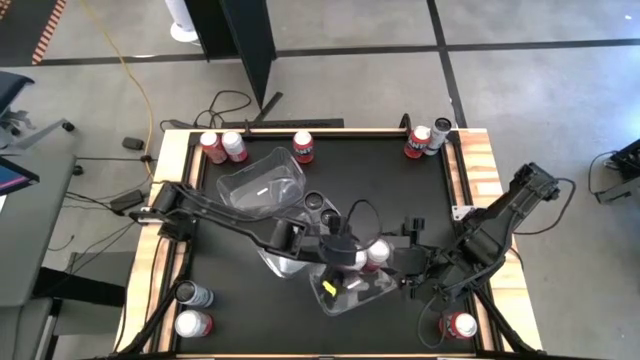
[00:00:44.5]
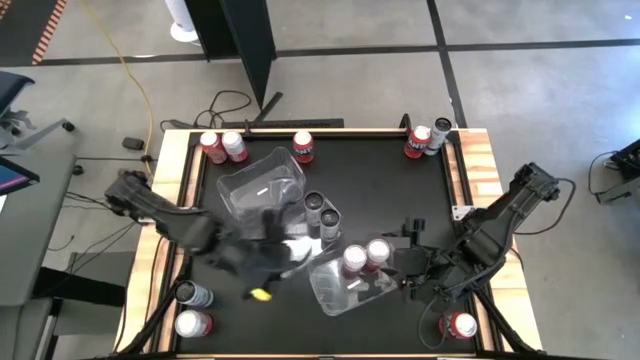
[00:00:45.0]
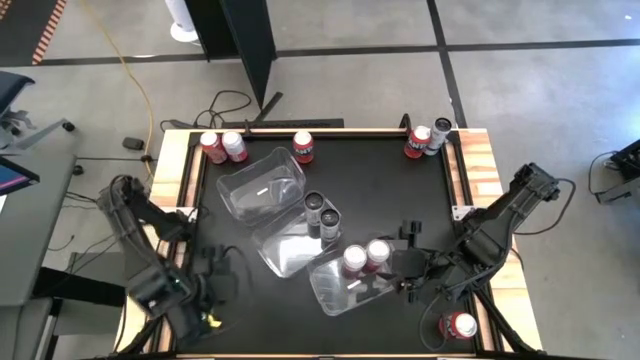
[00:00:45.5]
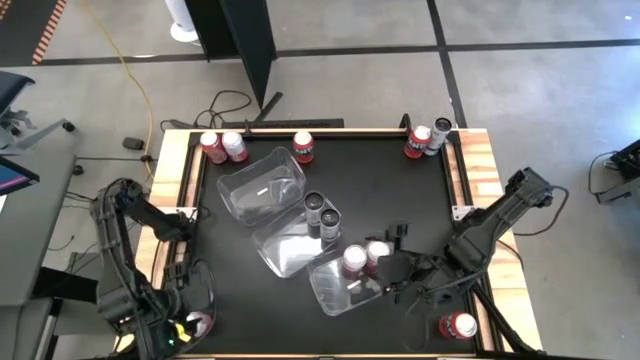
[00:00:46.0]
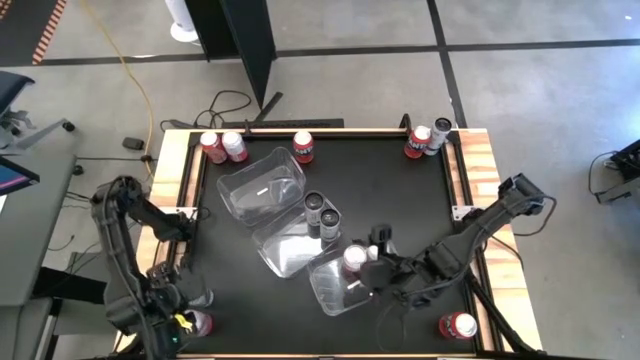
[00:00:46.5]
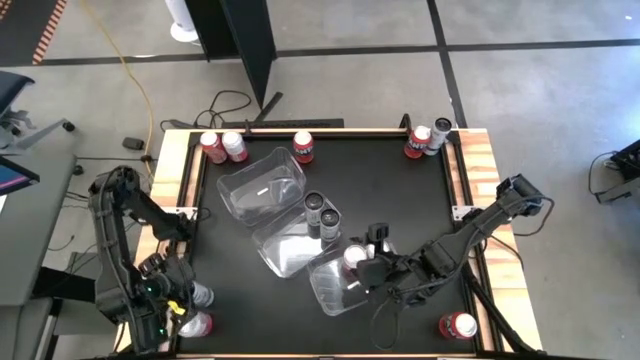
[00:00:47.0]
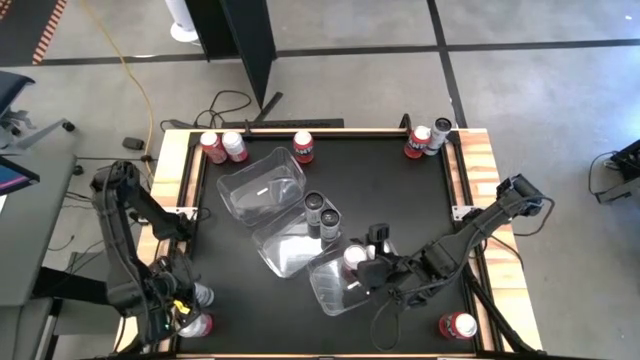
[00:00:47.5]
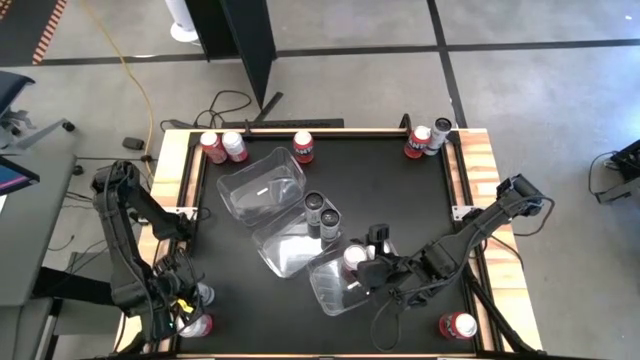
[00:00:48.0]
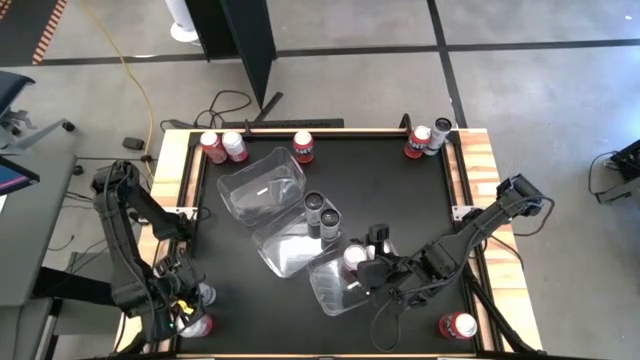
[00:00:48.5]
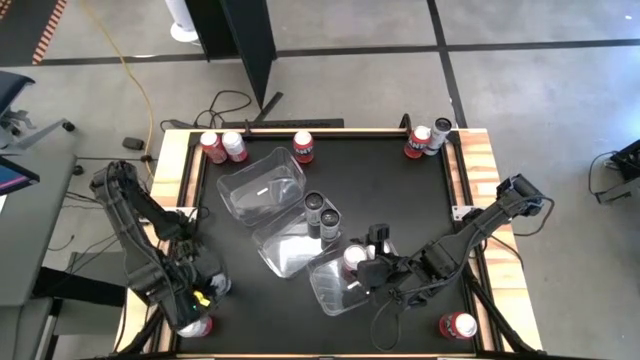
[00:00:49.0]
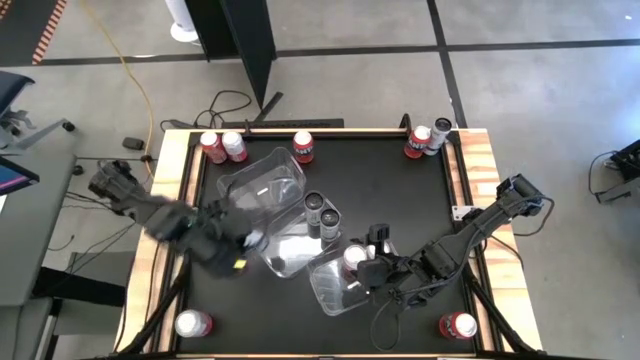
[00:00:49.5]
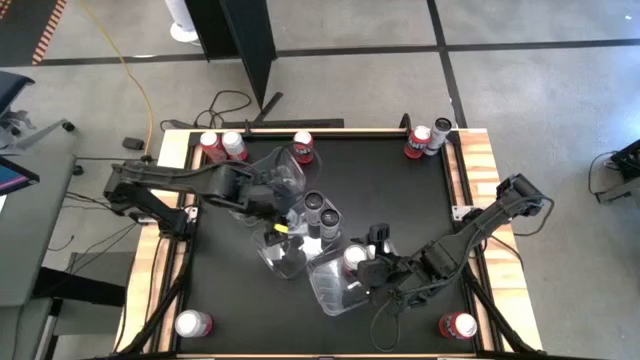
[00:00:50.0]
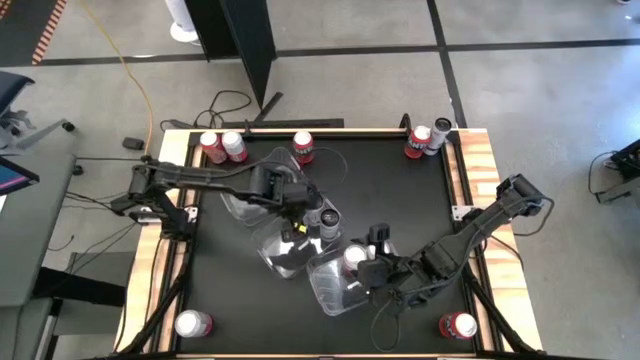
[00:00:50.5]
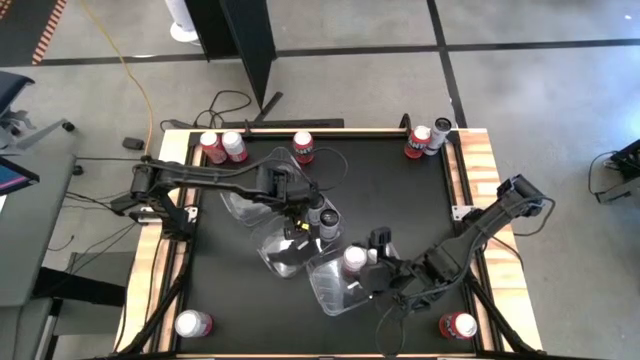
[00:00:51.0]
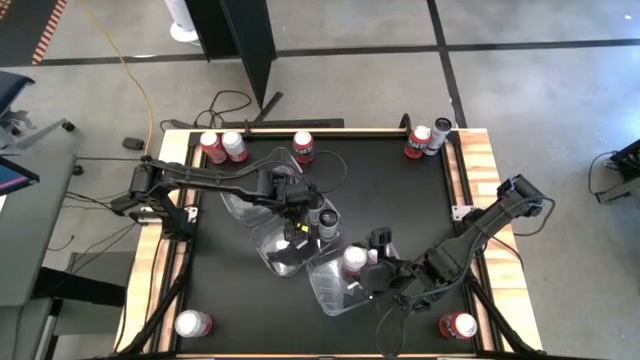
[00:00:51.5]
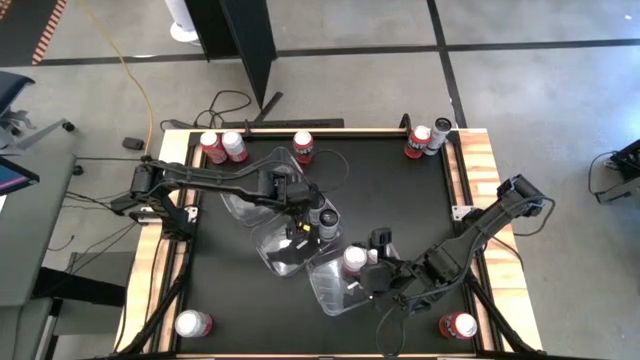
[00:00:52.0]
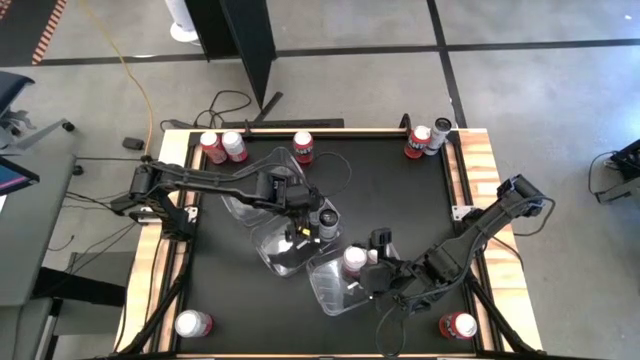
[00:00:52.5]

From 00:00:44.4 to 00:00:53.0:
Task: Sort soda cans
Put the bottom white soda can in the center transparent bin

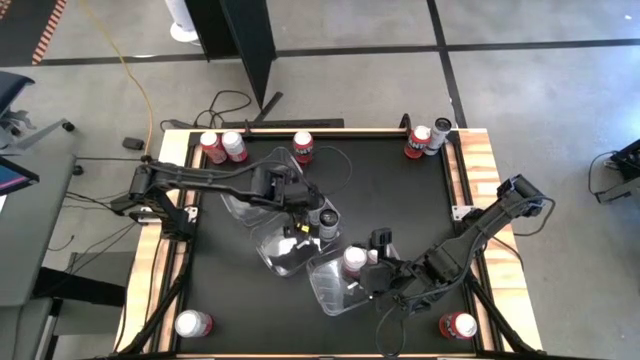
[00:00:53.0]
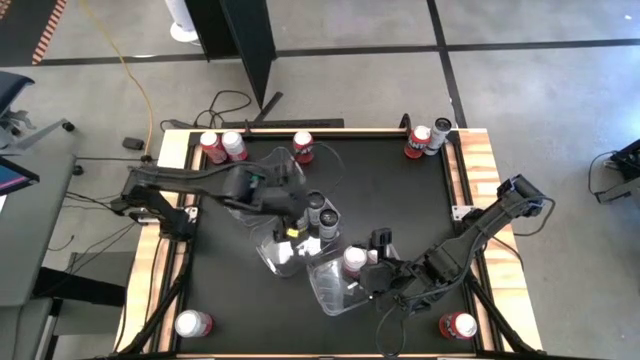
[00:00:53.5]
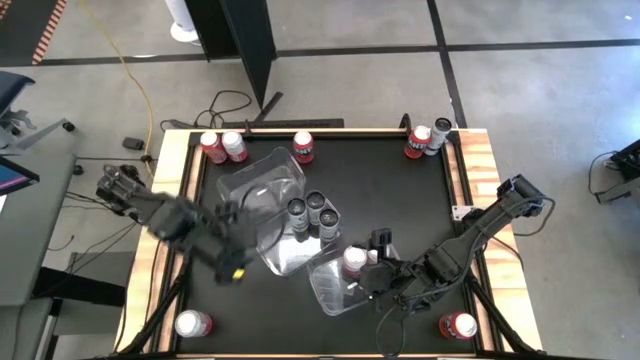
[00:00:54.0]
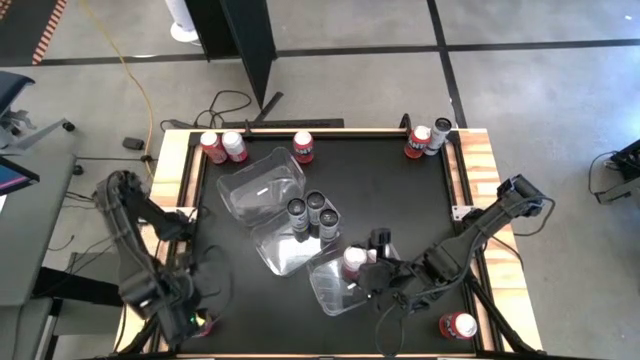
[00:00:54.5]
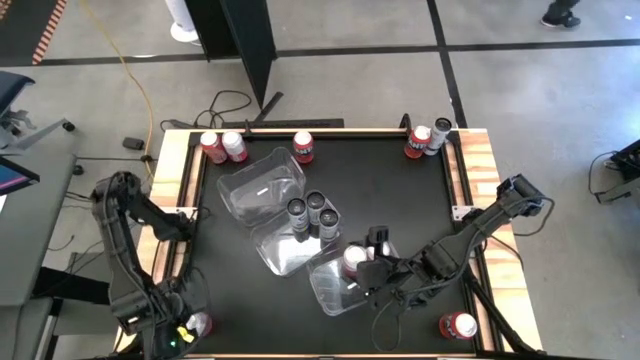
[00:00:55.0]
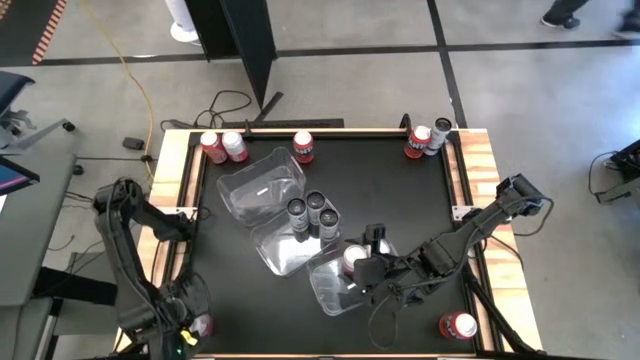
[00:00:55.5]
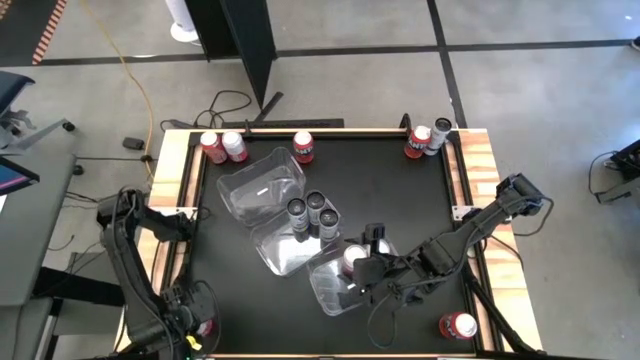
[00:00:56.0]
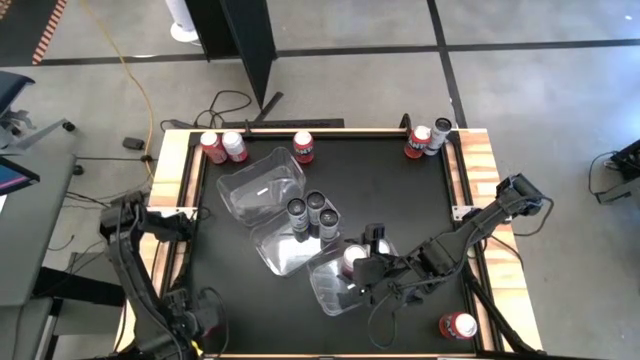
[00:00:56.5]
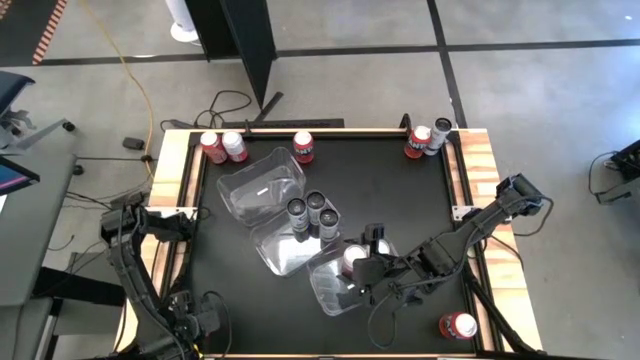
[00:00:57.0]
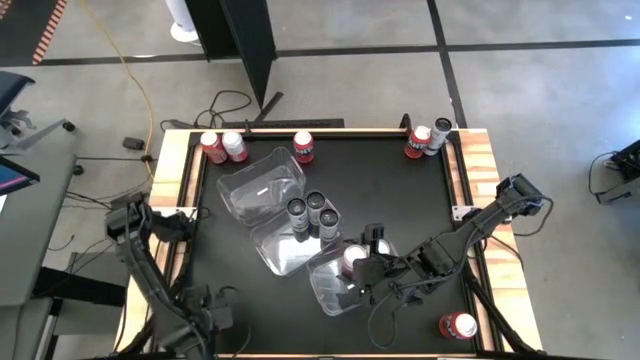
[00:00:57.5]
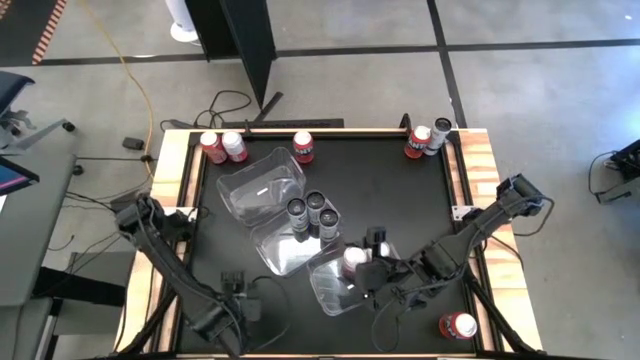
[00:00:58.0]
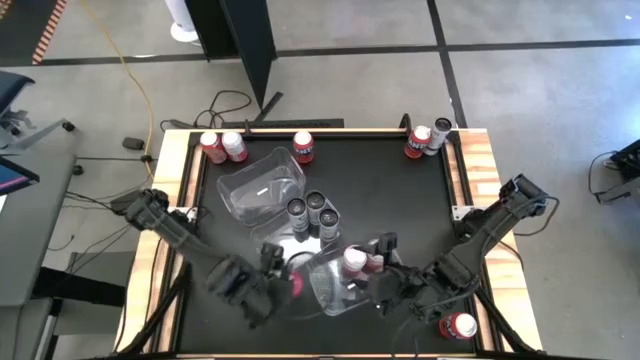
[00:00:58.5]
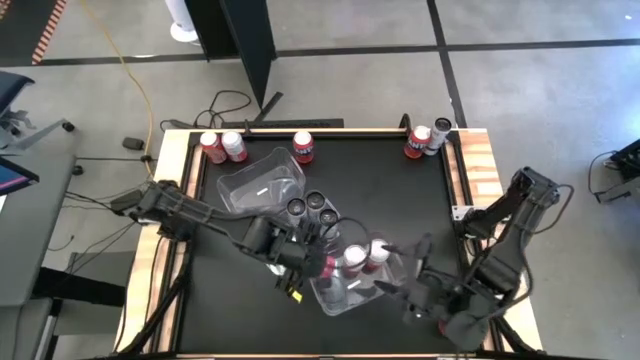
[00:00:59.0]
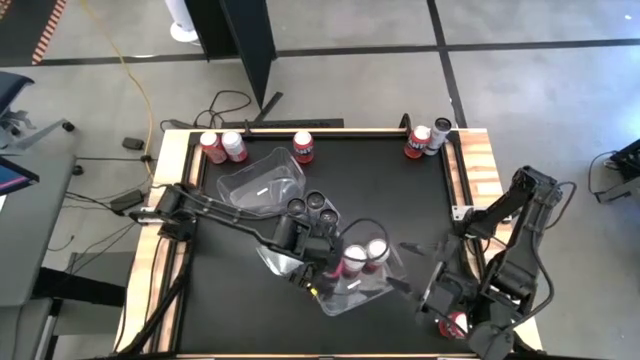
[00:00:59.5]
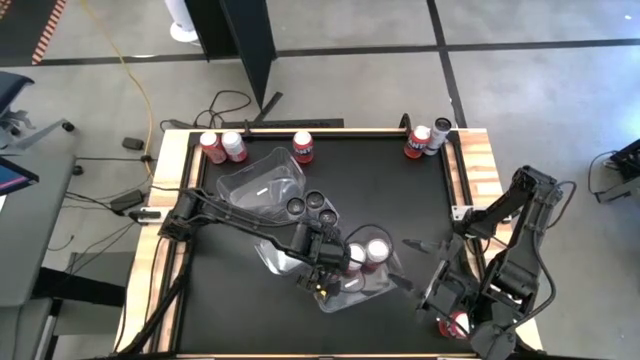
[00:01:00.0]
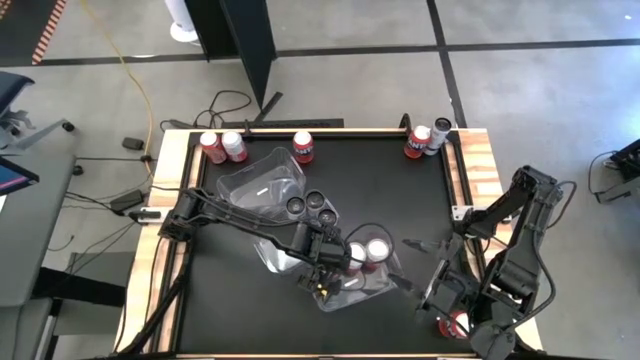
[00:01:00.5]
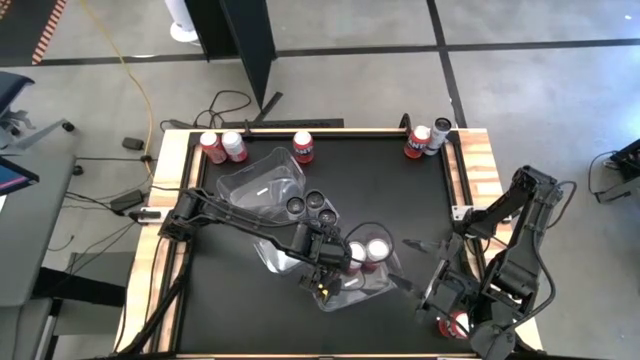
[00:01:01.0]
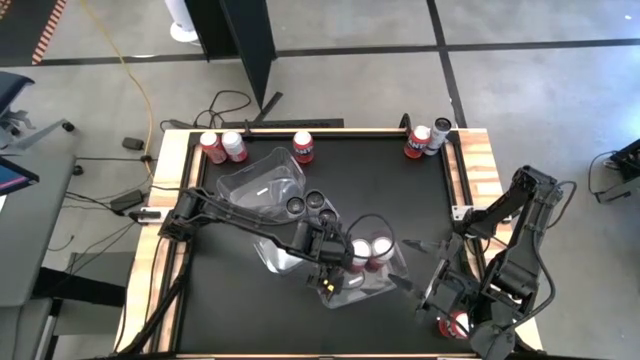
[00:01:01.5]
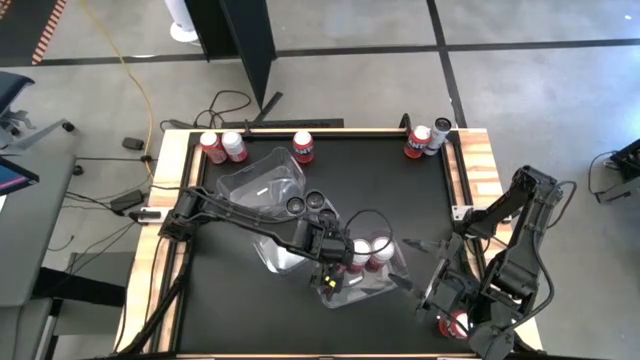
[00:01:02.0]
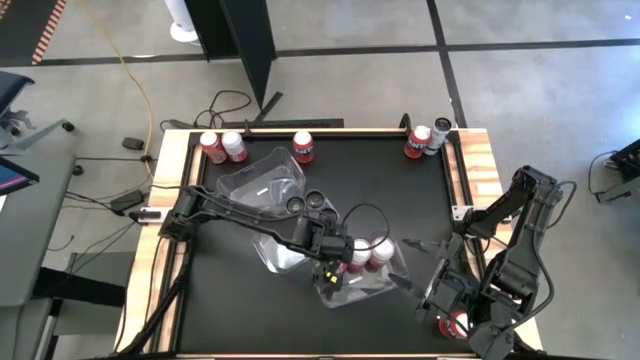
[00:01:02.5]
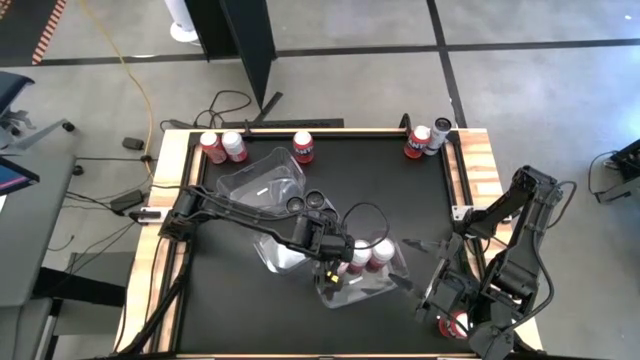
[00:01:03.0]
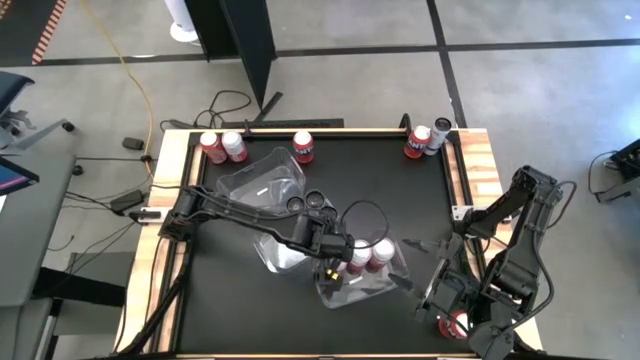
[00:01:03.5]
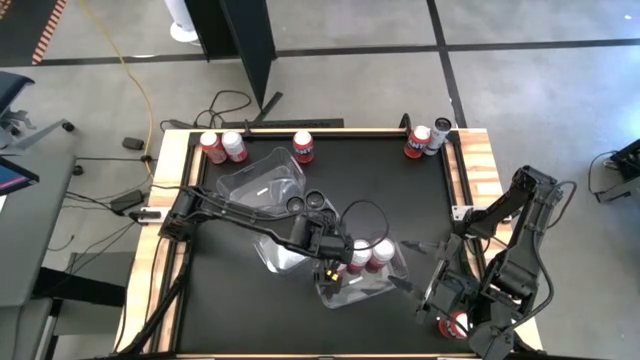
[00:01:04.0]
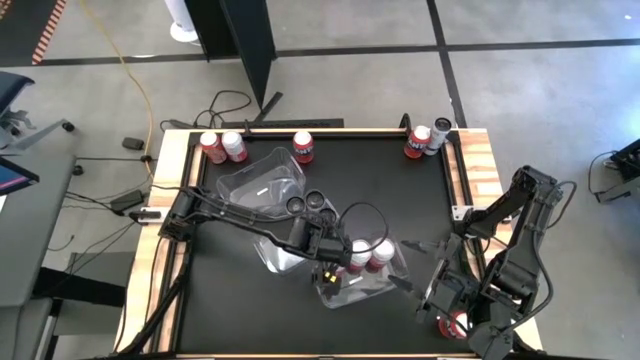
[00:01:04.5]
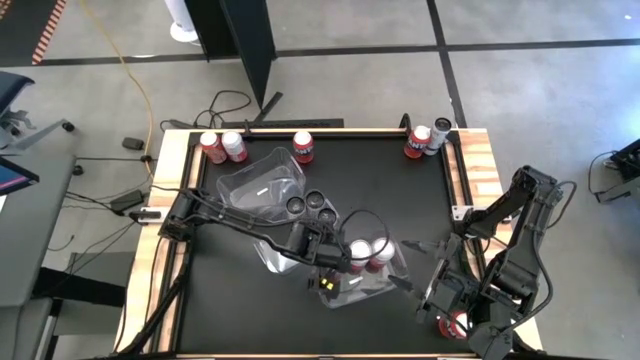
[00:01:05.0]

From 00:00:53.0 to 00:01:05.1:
Put the bottom pink soda can in the bottom right transparent bin
